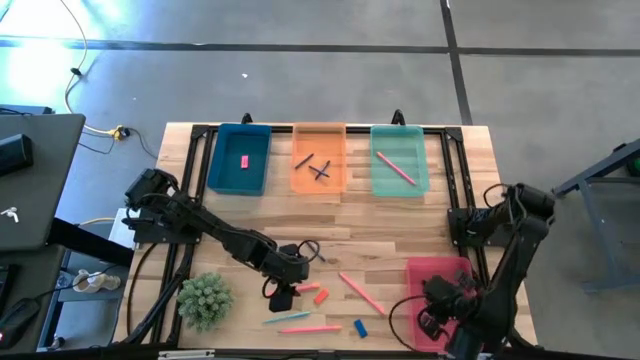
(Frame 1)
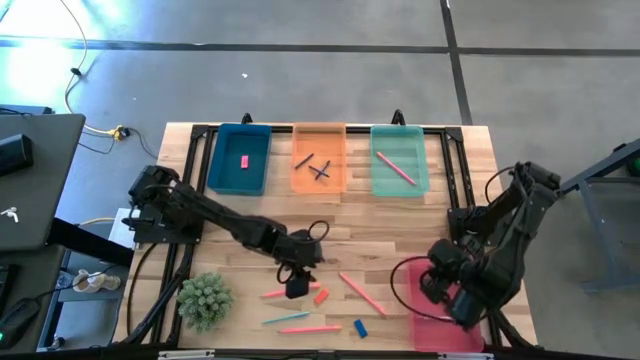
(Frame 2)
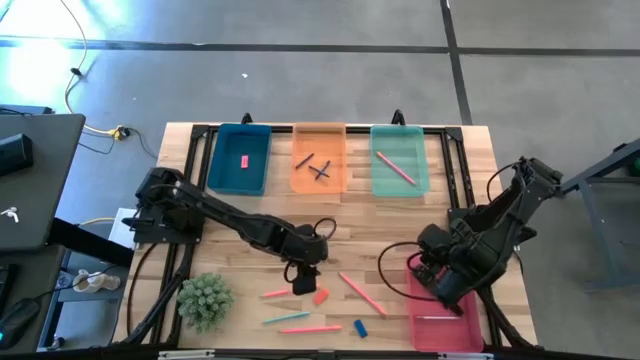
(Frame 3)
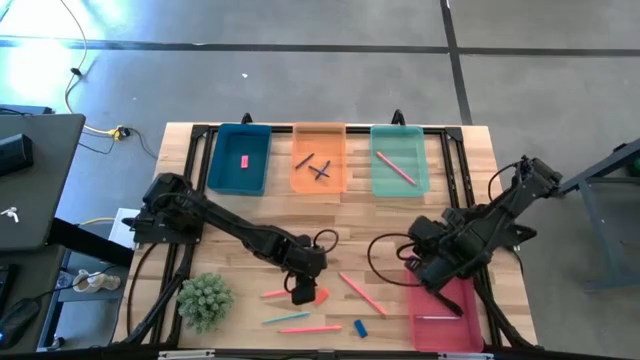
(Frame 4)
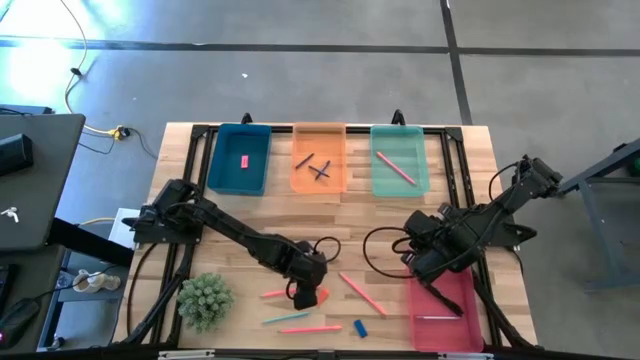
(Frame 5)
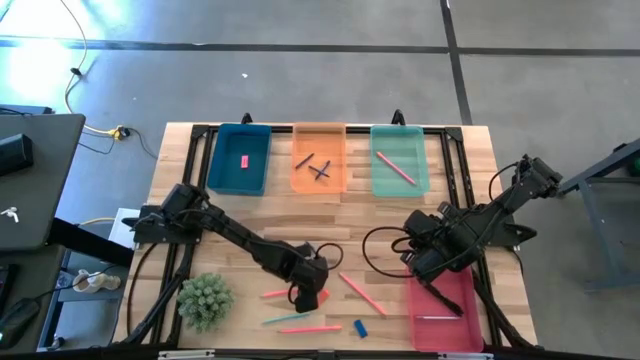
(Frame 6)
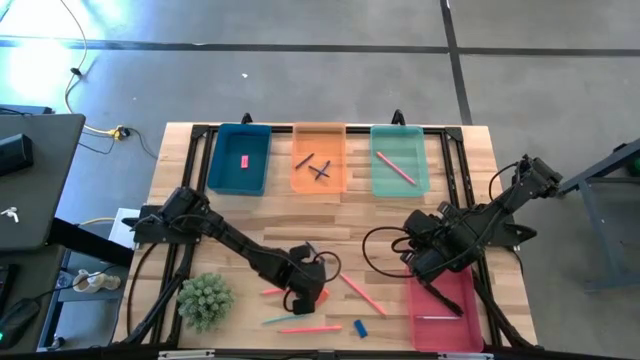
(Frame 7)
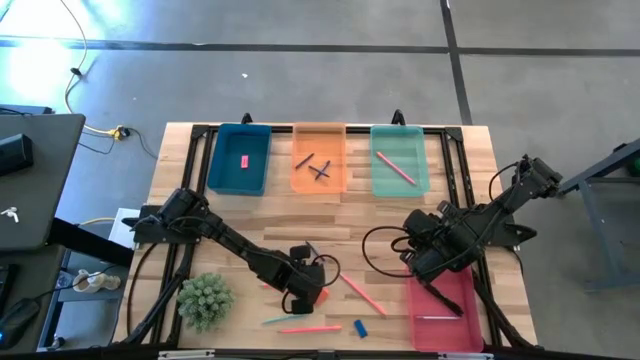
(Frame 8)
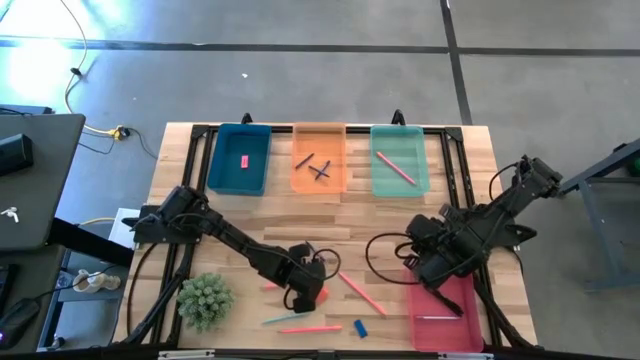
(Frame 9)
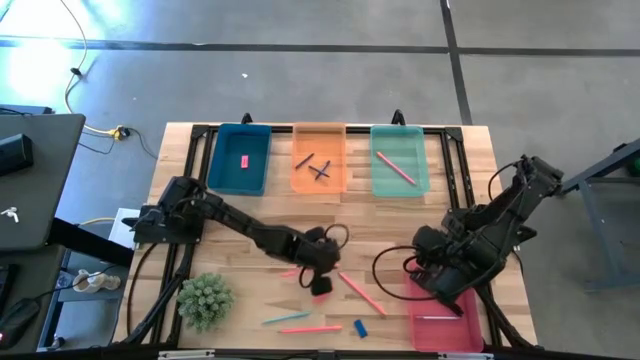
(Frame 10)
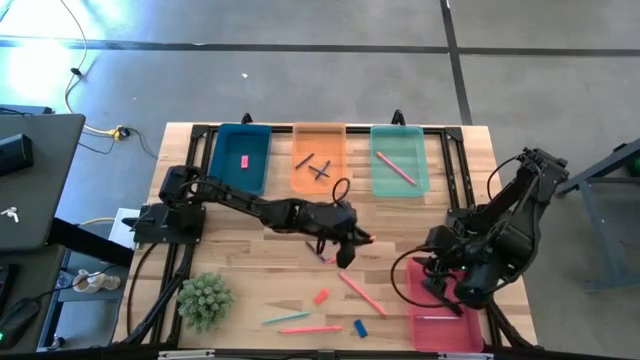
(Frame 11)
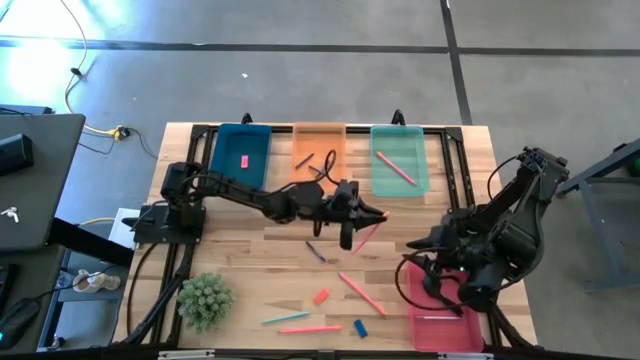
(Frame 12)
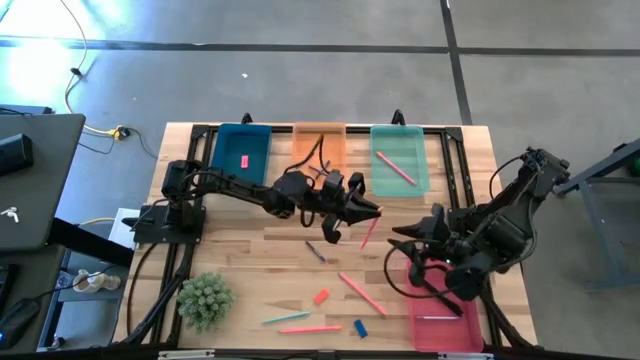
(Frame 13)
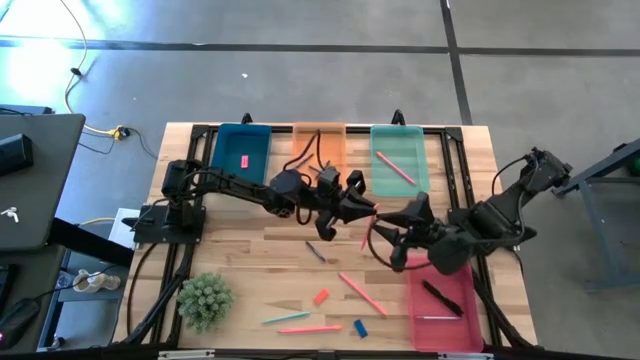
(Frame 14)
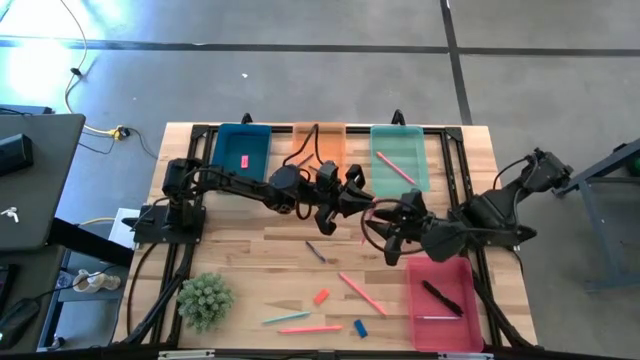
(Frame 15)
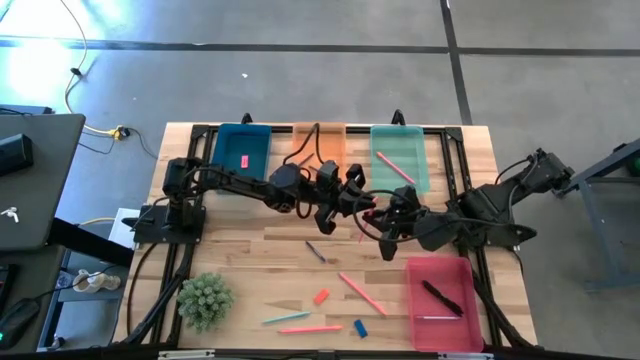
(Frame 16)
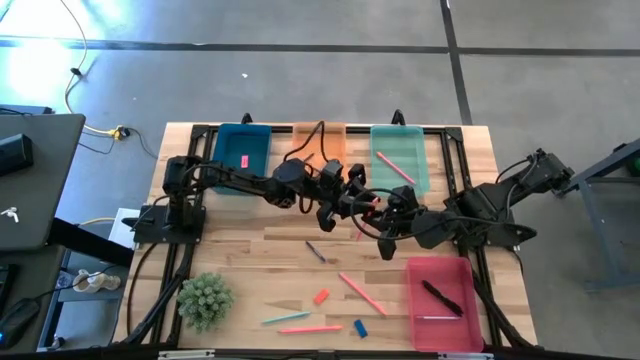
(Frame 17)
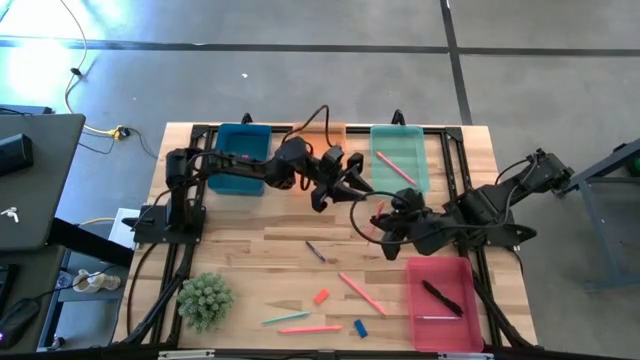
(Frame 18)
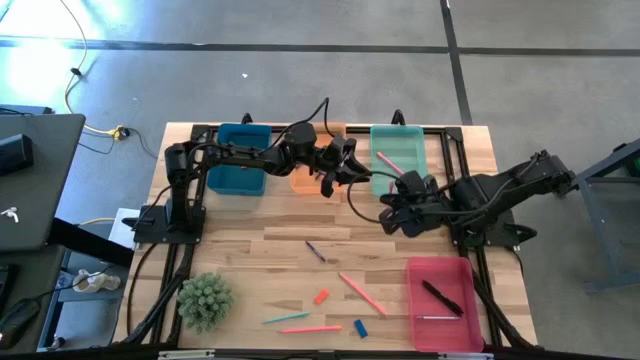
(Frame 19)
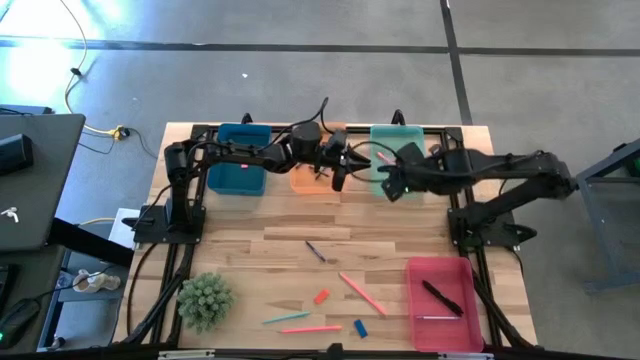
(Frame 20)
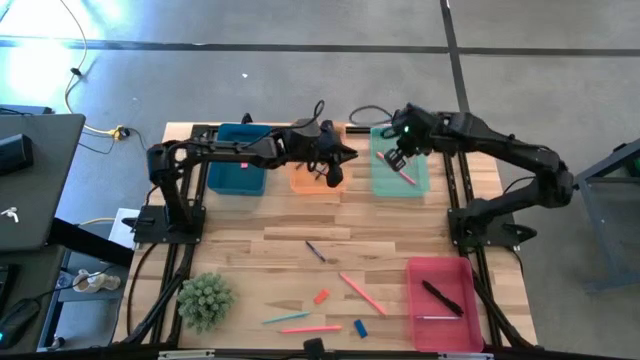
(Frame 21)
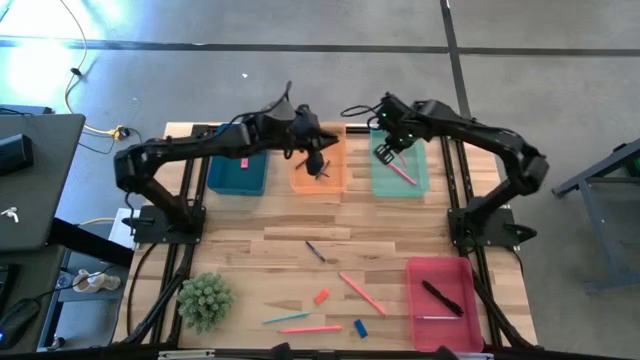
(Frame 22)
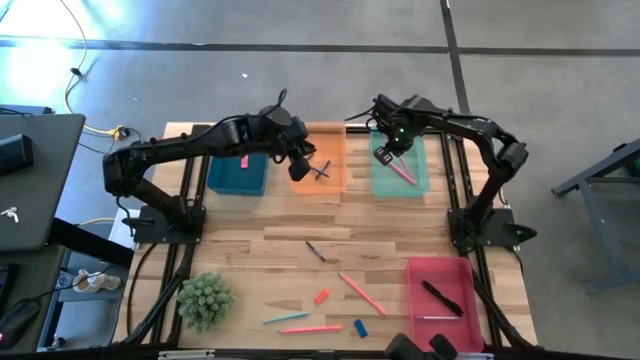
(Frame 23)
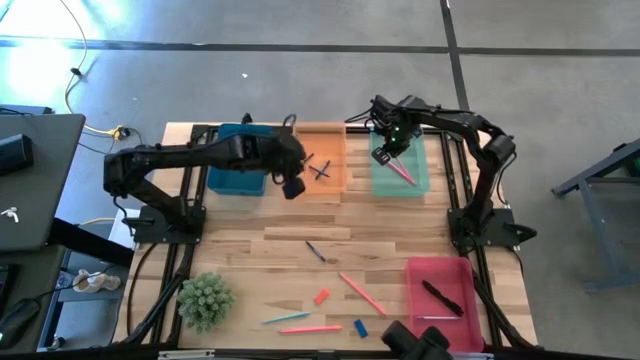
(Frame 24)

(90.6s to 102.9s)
Task: Sort crayons/erasers/pens/pencils in bins
Put the top left pink pencil into the light green bin

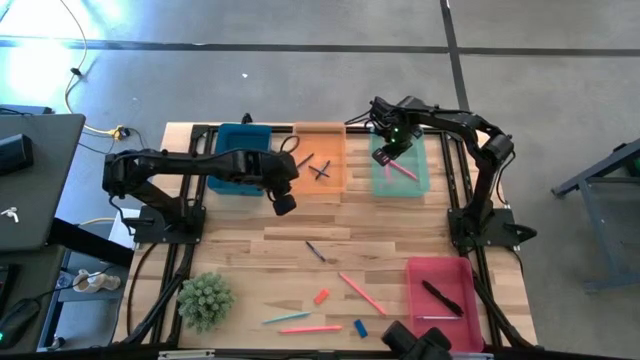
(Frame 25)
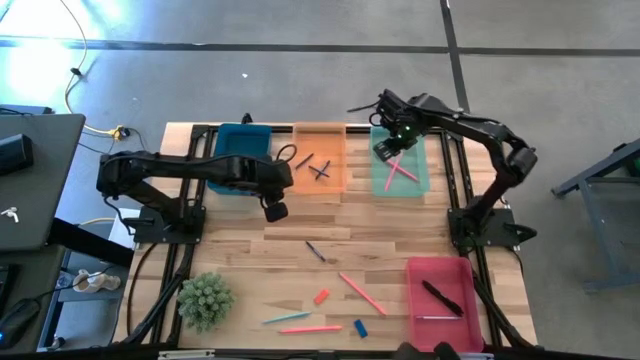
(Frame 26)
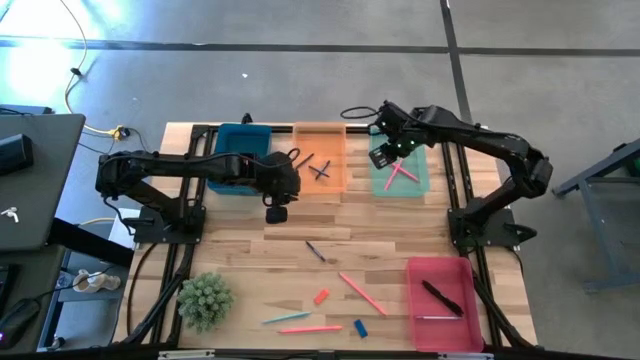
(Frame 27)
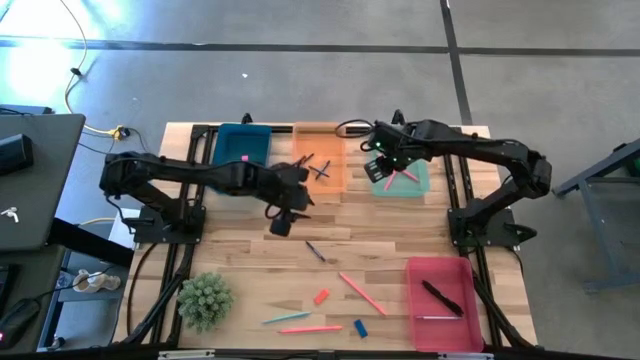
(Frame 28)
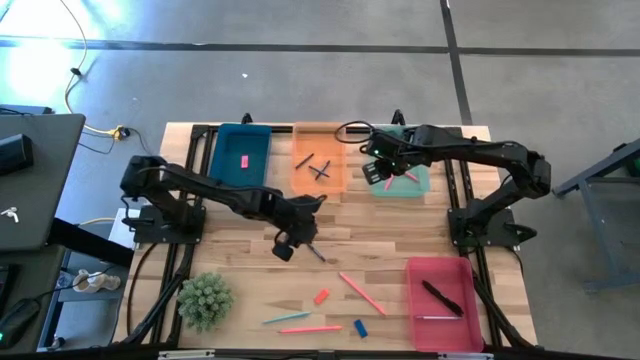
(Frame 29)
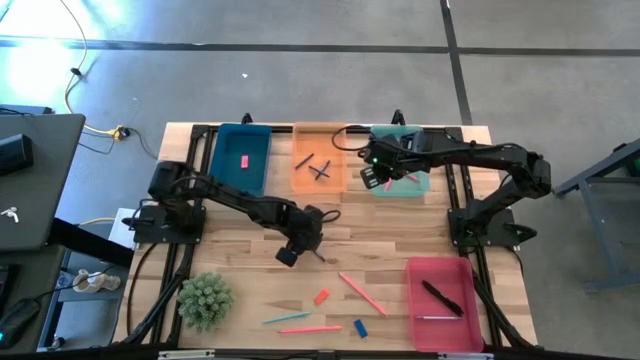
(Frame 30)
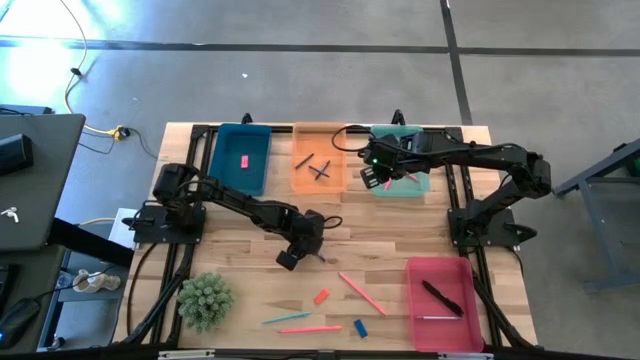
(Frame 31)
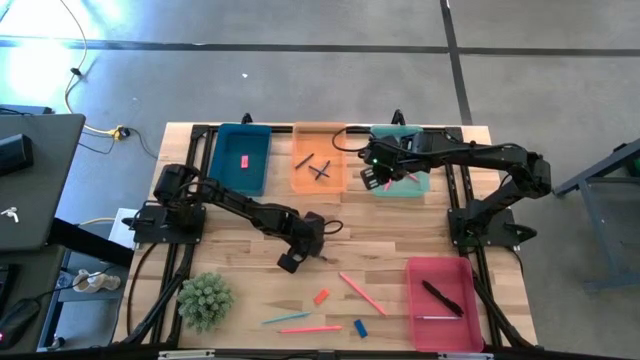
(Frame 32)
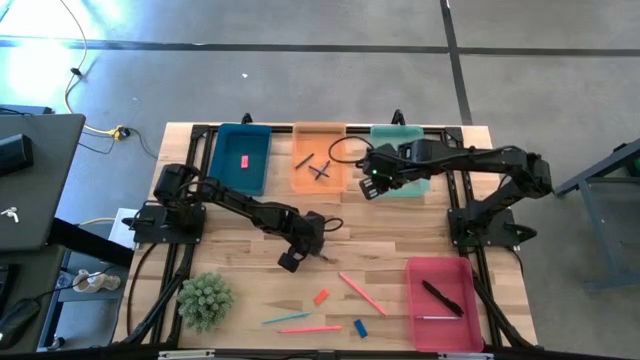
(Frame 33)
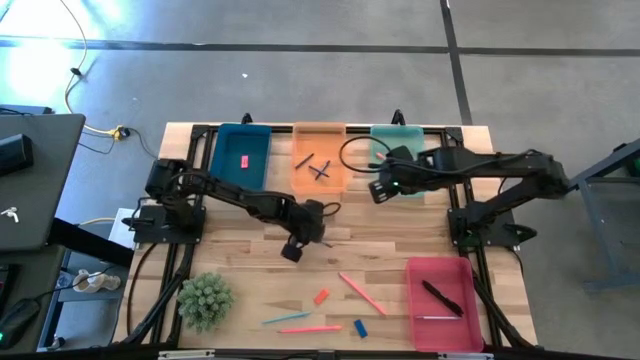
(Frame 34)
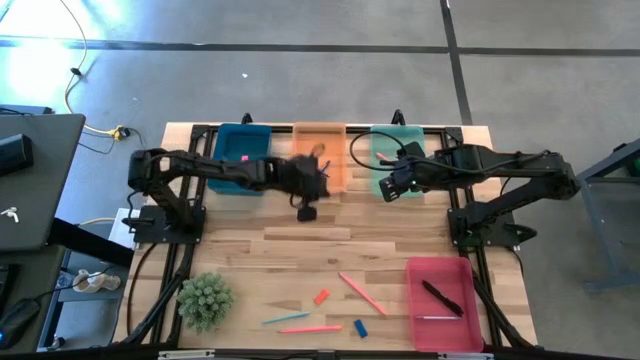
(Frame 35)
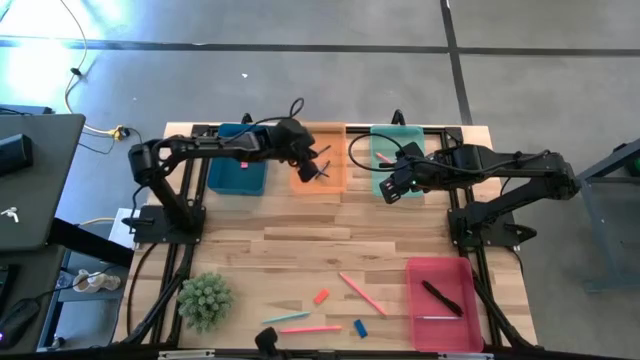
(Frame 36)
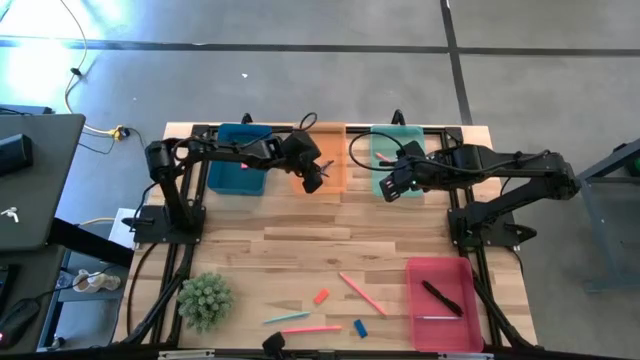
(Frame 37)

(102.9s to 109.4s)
Put the blue crayon into the orange bin

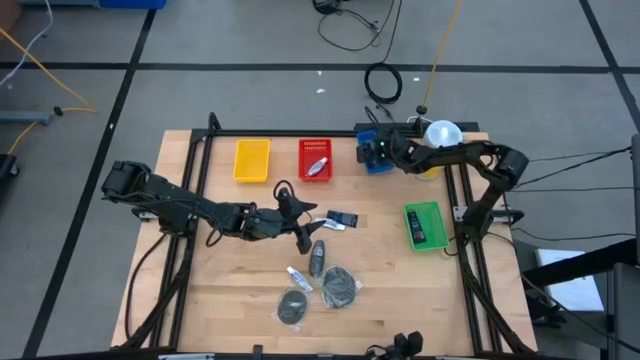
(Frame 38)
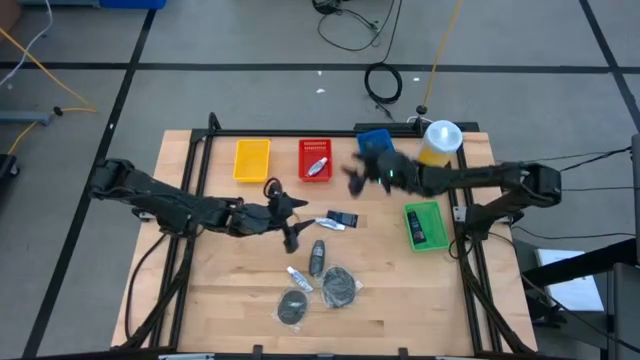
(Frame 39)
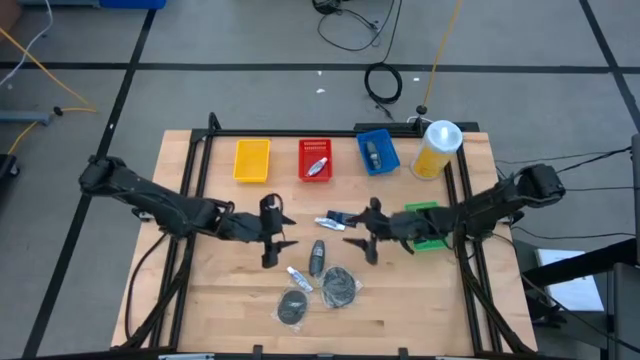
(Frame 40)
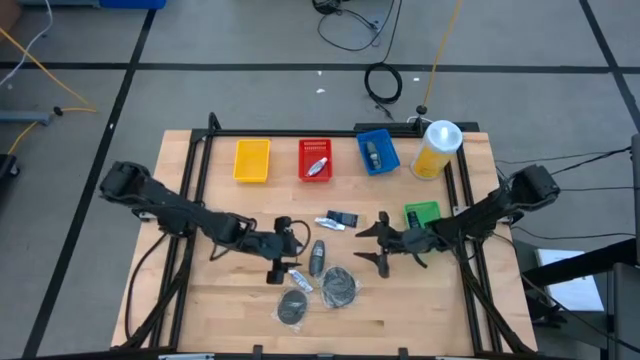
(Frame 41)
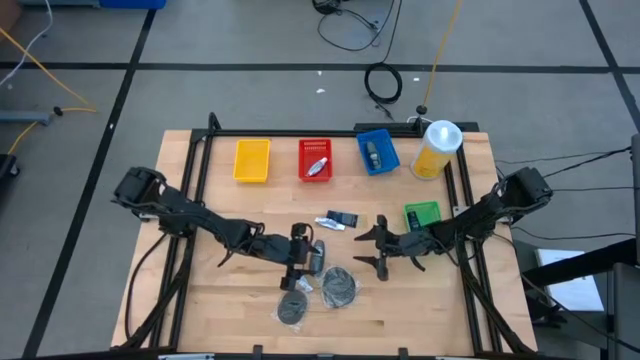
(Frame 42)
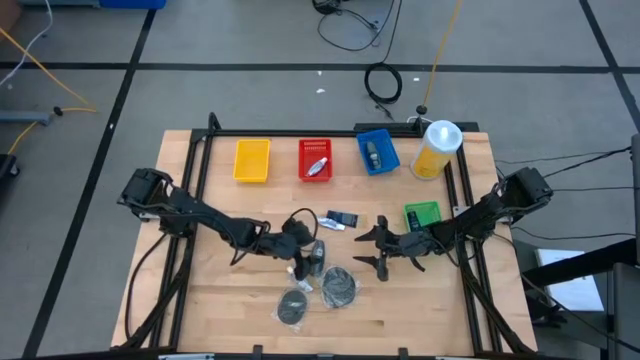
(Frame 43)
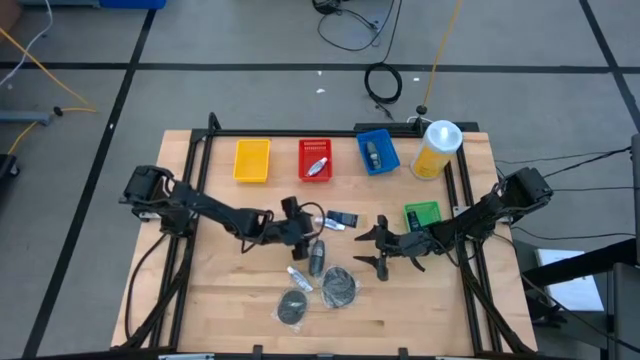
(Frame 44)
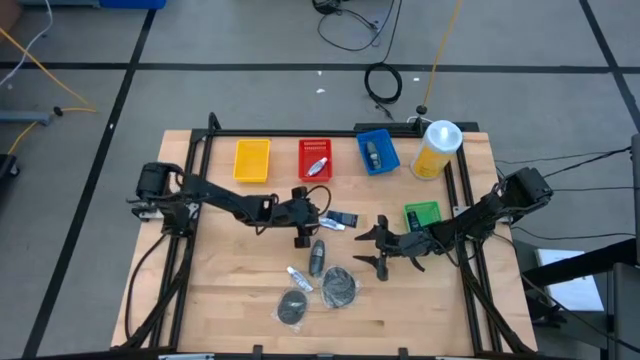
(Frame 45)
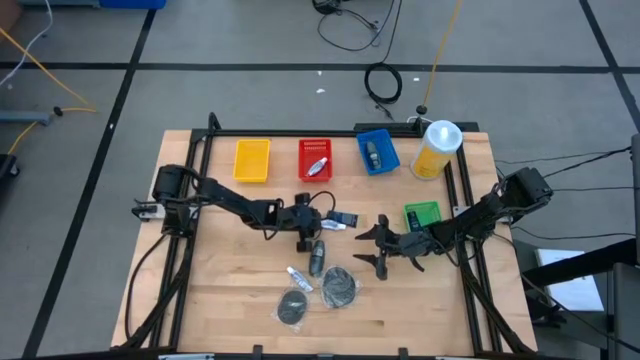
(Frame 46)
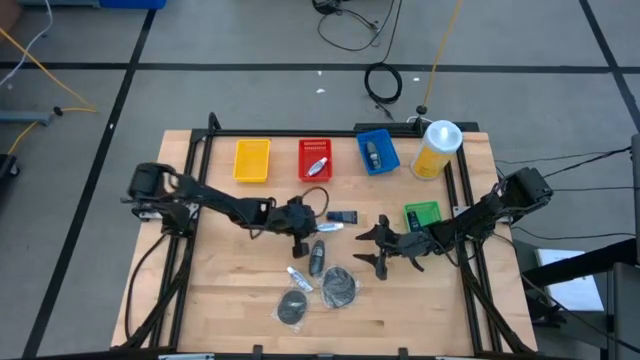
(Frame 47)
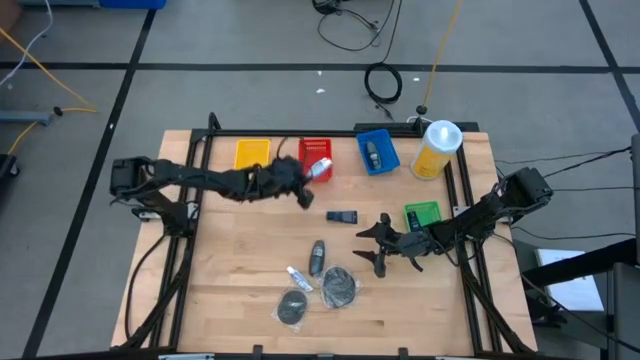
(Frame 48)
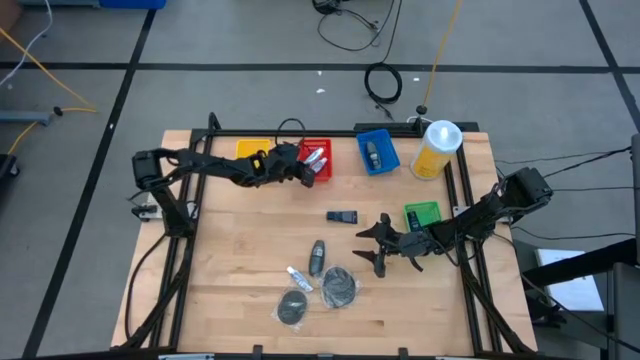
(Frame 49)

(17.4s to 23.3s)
Task: Pick & Place Travel size toiletries
Put the white toothpaste into the red bin
